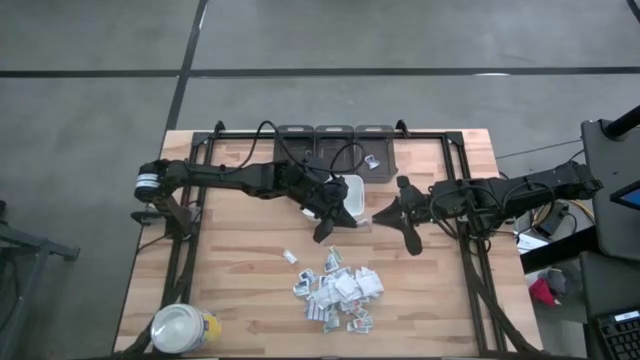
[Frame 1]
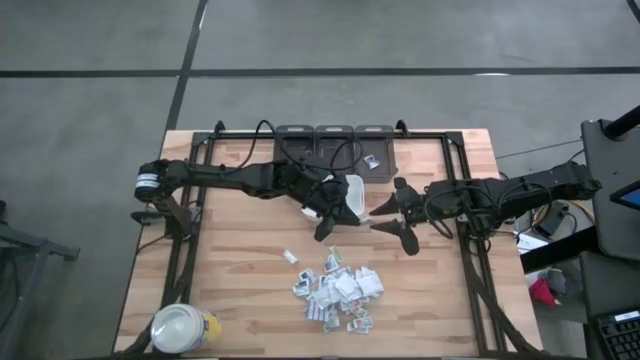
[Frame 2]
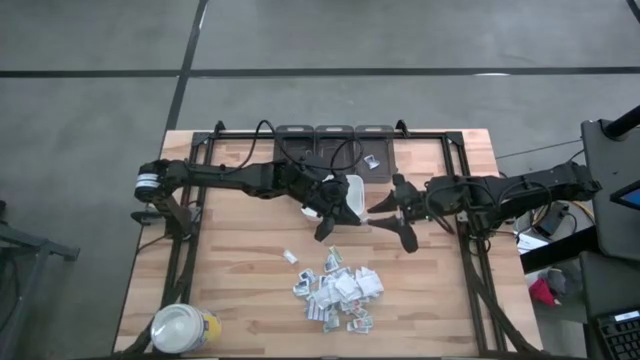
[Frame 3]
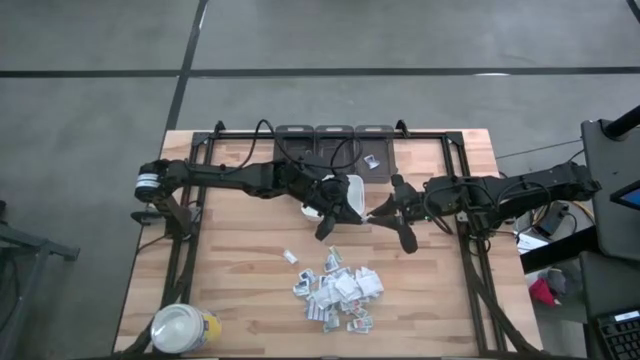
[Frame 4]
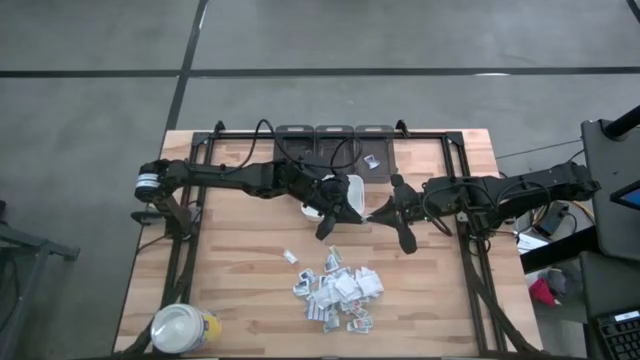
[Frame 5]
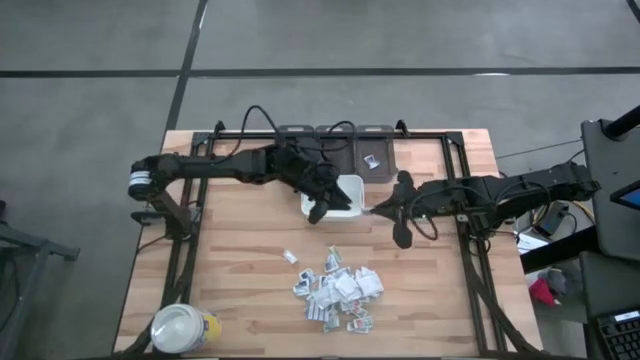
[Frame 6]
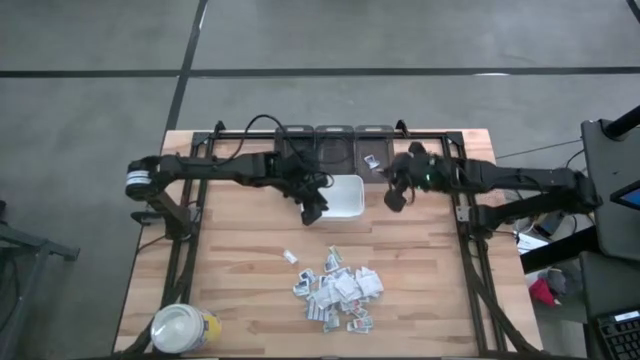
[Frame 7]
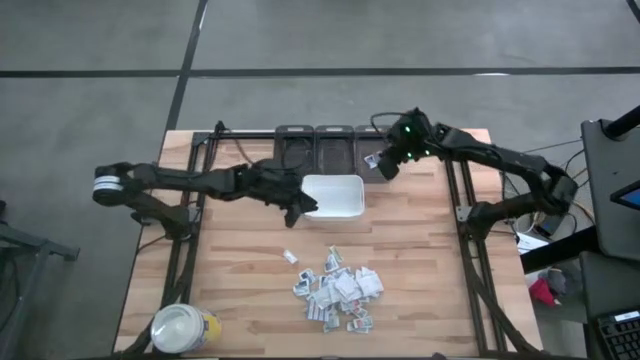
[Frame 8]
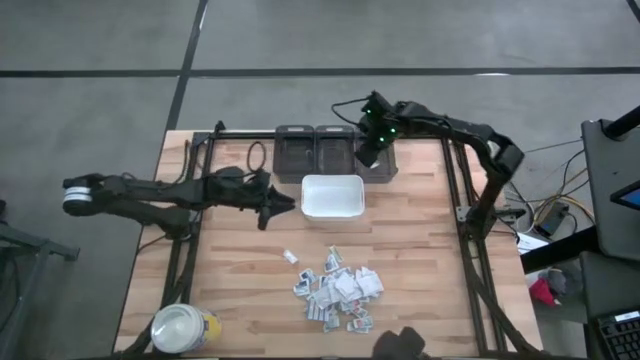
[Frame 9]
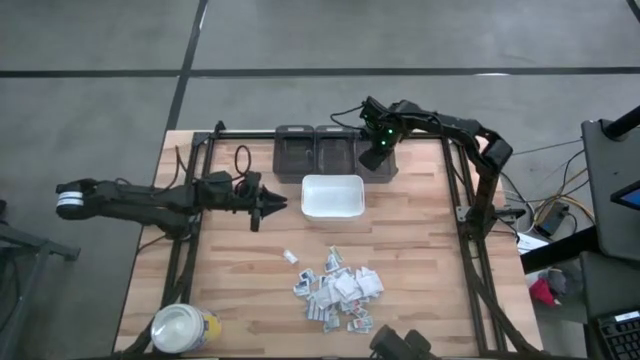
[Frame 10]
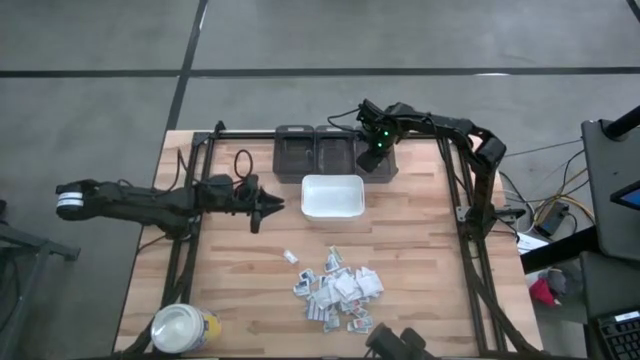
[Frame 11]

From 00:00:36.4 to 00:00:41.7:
Task: Pick & Place First Aid Supplies
Put the white alcohol pad into the right black bin

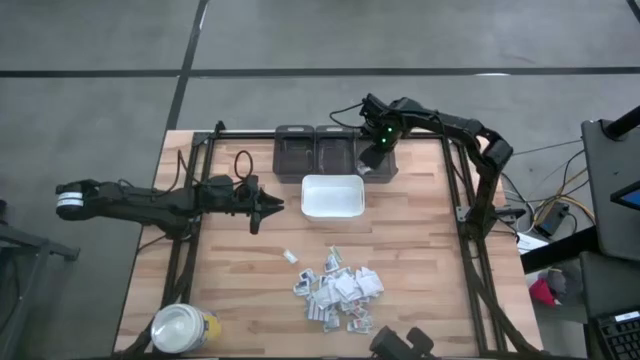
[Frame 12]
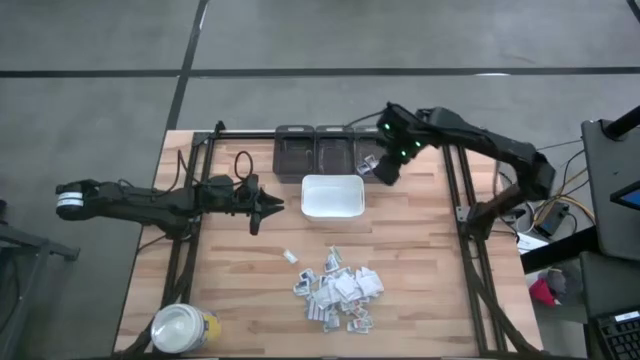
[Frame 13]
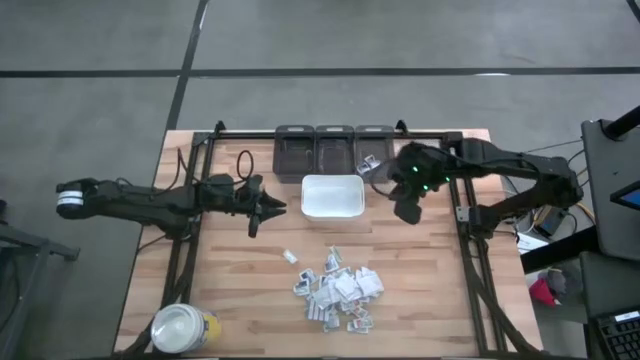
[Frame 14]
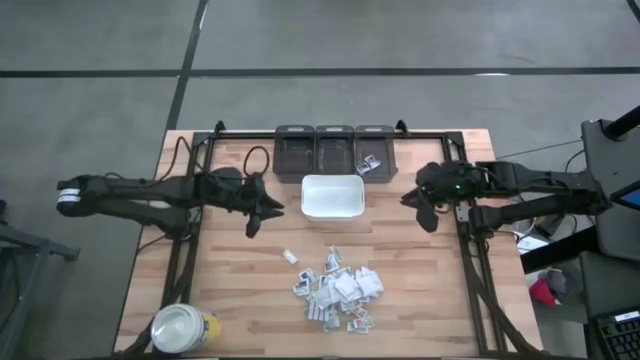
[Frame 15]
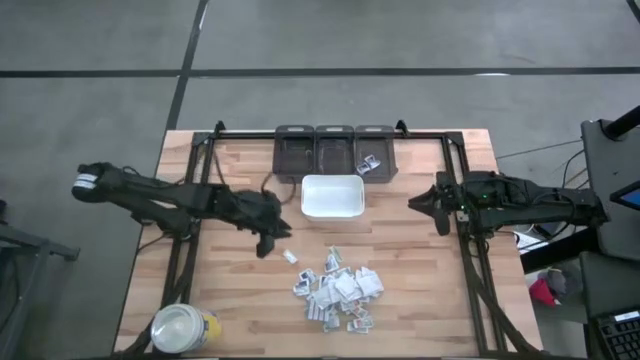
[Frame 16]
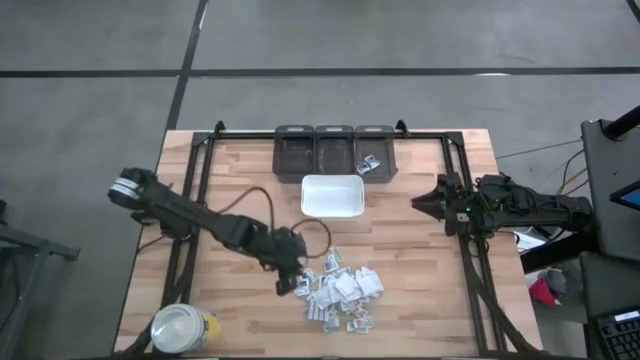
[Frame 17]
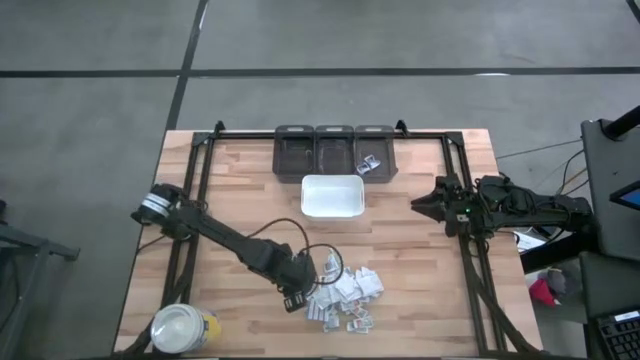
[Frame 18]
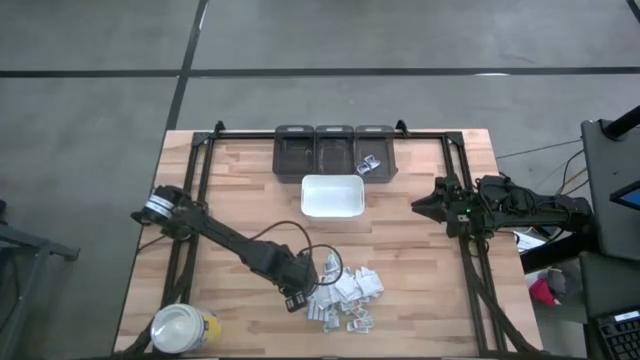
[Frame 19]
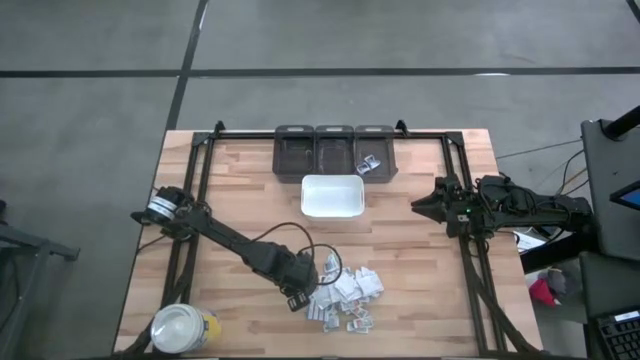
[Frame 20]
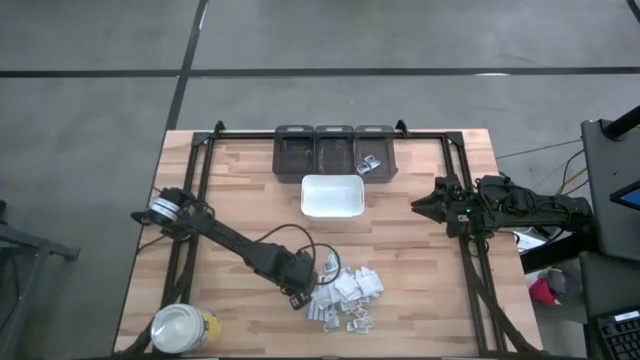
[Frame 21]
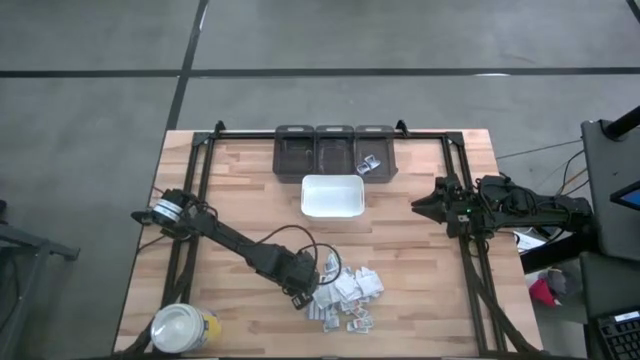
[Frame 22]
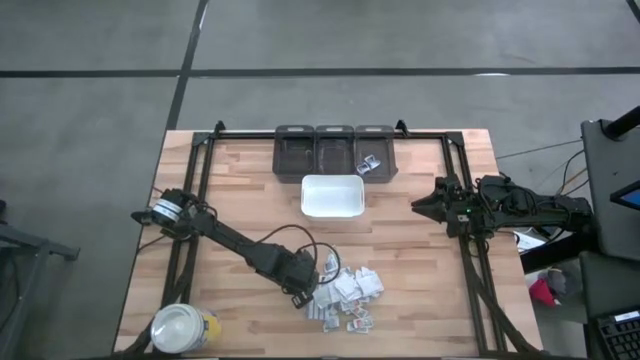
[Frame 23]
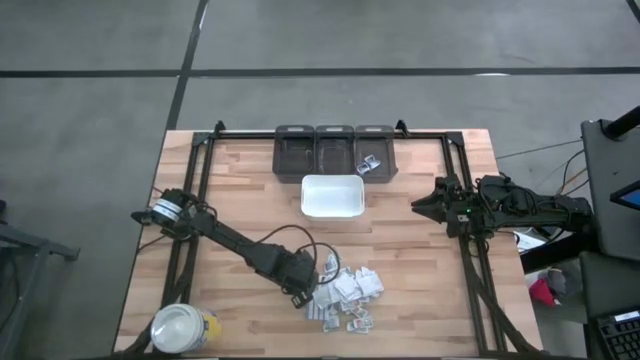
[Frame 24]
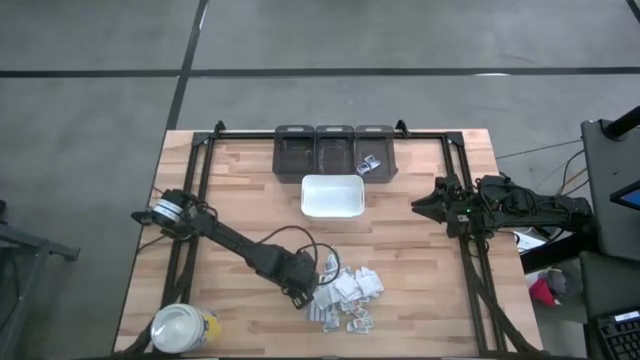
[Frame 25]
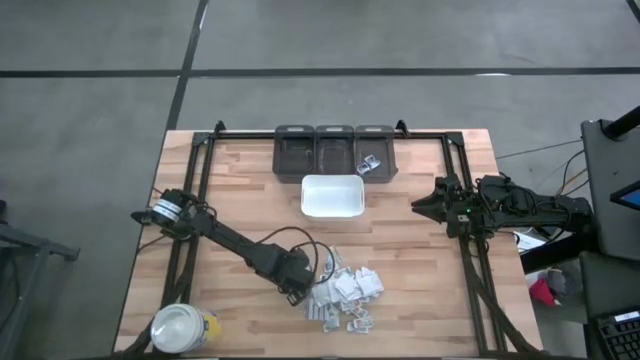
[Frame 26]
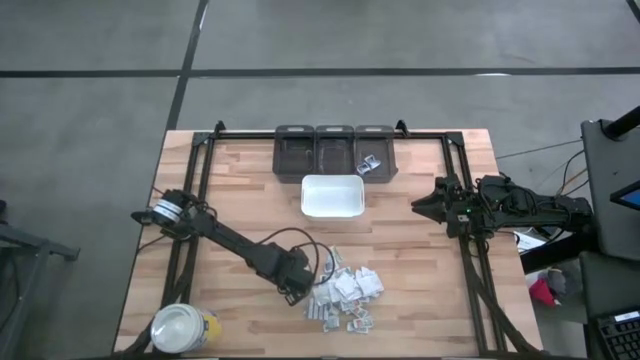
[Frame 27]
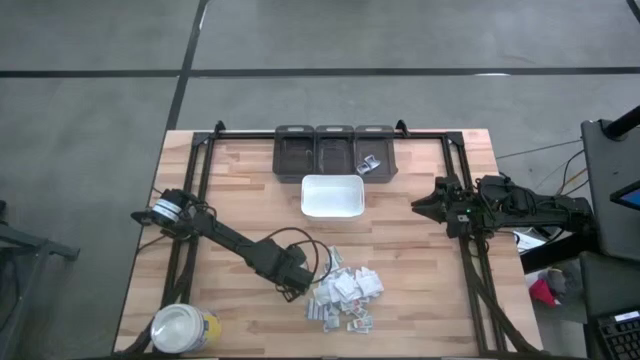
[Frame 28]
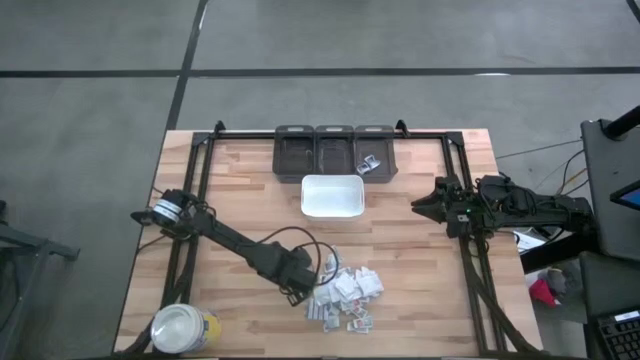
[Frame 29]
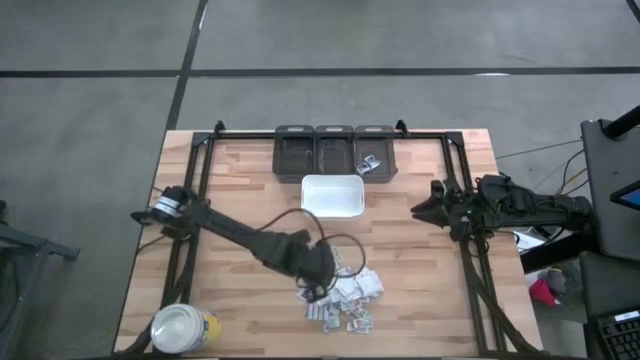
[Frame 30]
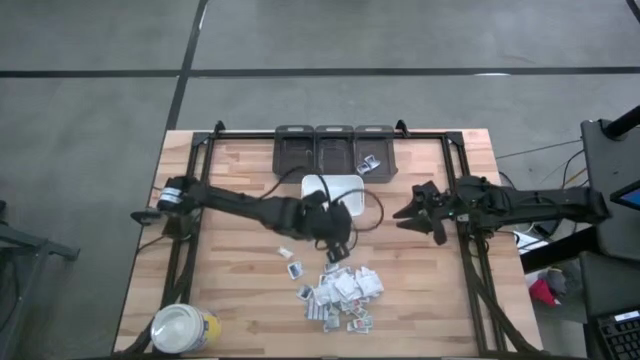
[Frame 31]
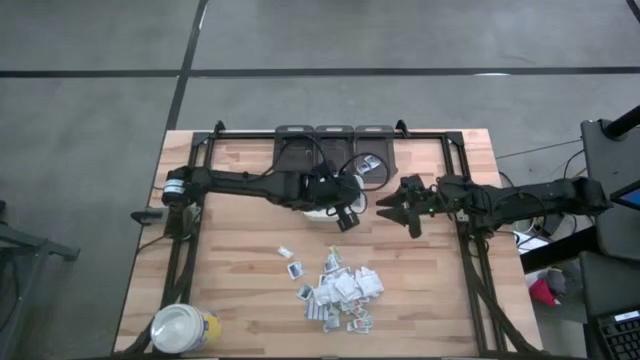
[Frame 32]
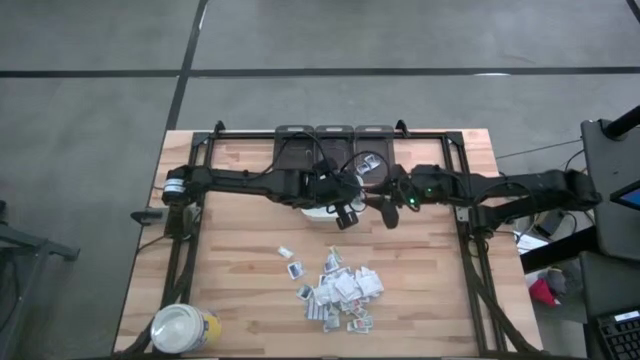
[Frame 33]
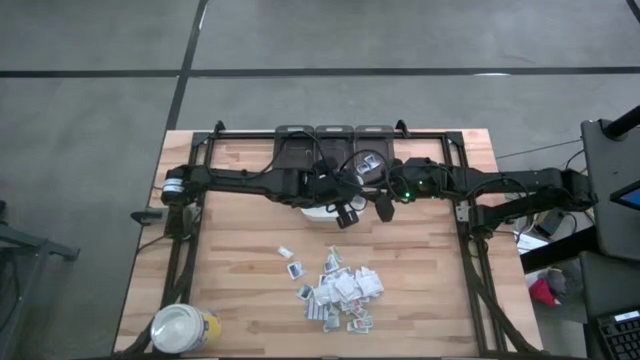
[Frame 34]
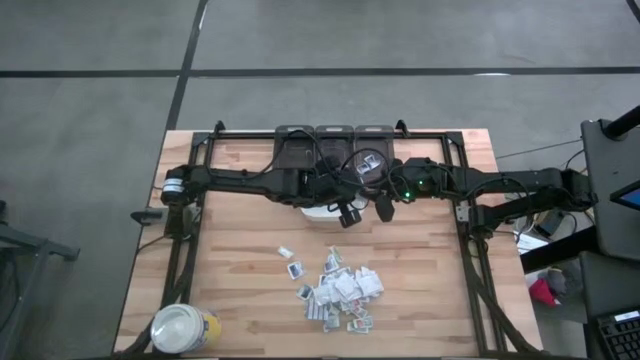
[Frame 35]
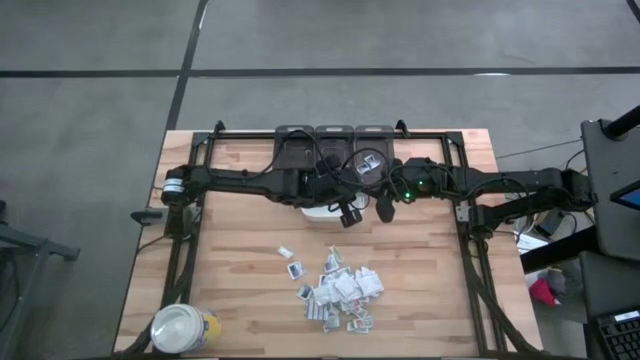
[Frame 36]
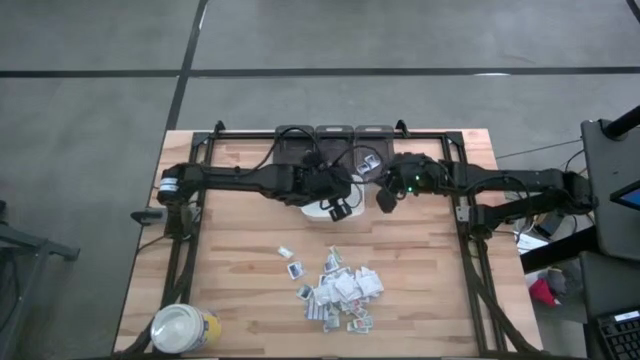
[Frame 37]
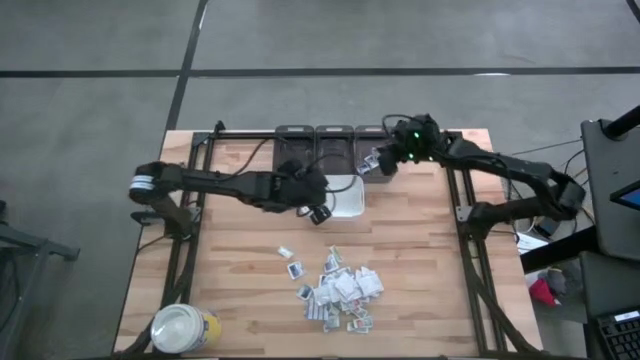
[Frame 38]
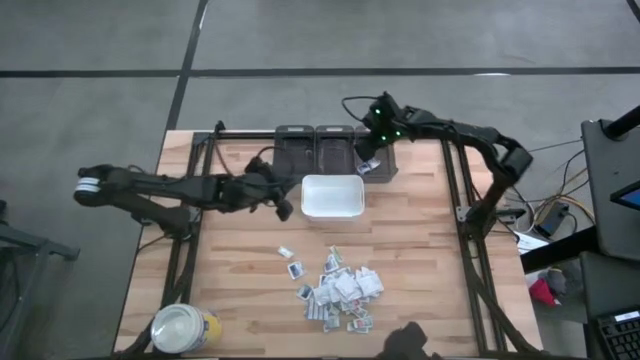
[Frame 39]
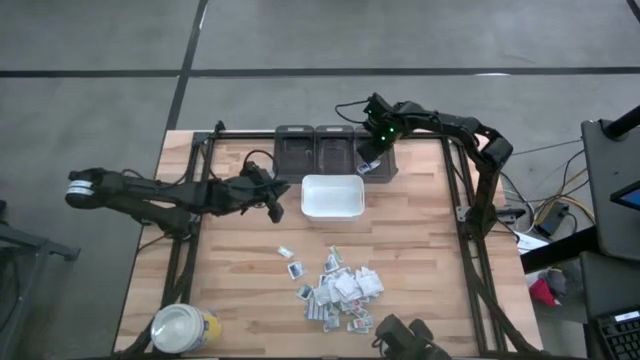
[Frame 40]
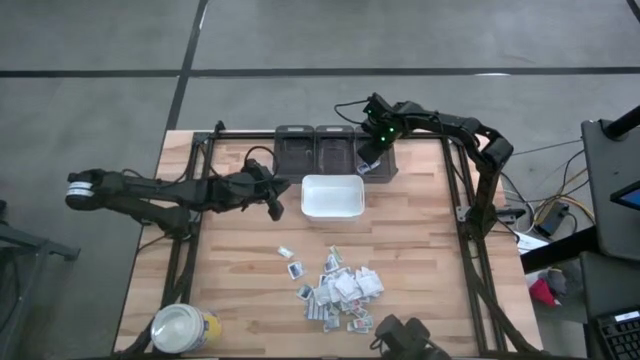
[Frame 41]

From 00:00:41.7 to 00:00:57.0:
Put the white alcohol pad into the right black bin
